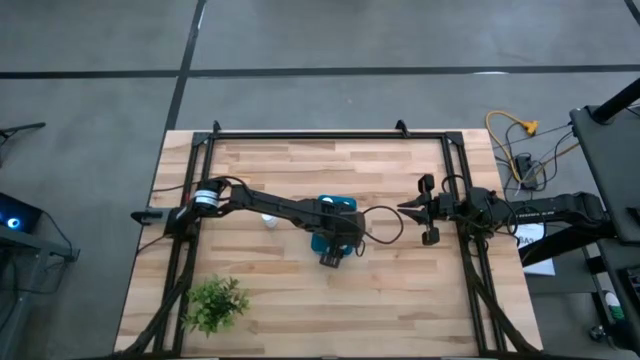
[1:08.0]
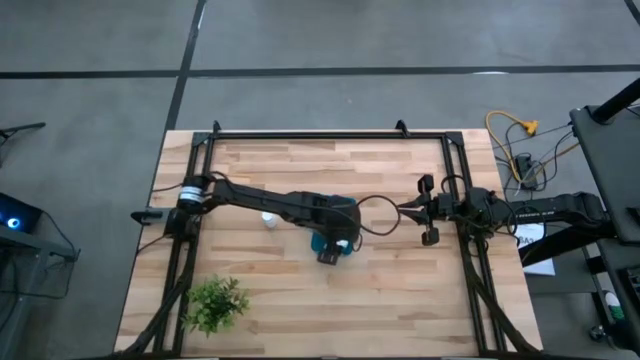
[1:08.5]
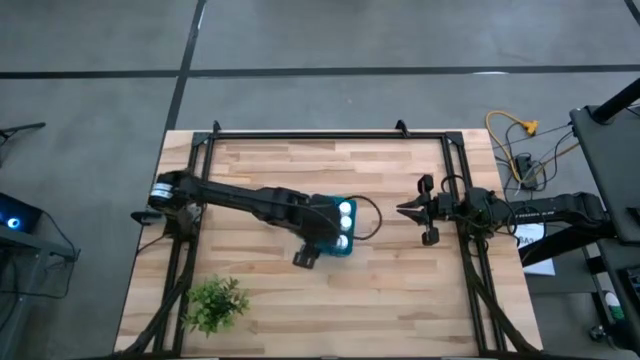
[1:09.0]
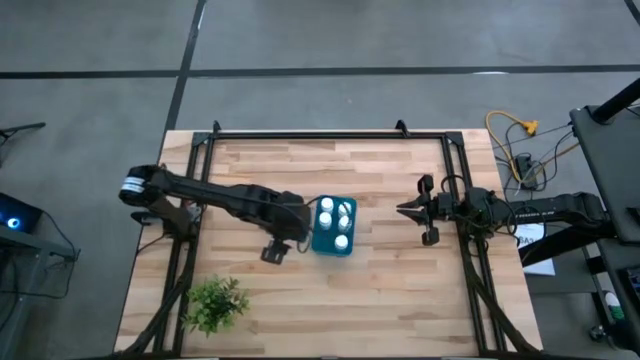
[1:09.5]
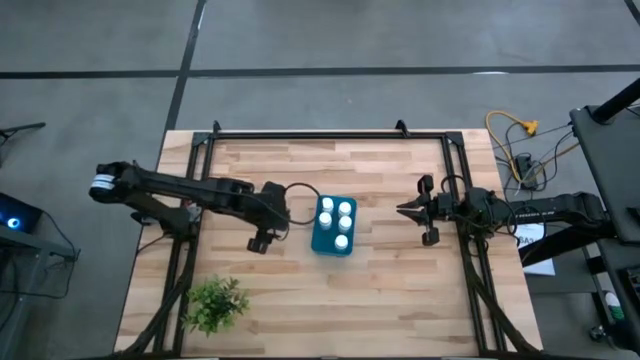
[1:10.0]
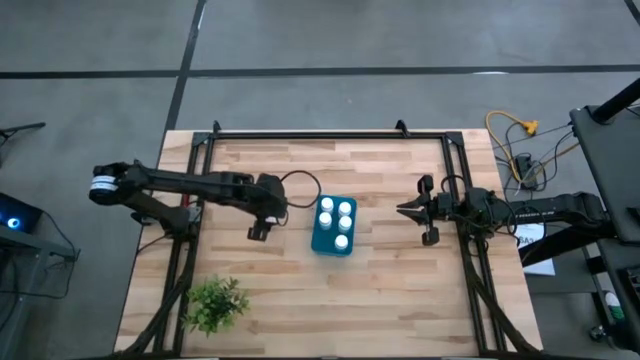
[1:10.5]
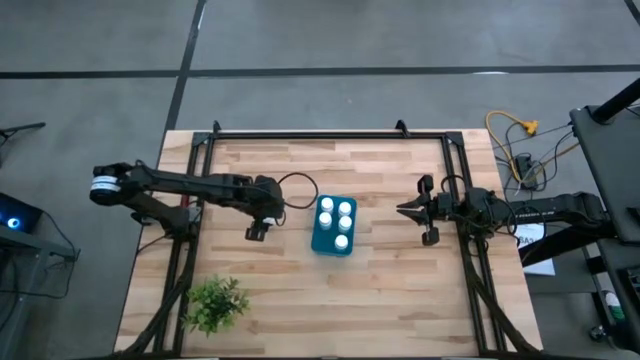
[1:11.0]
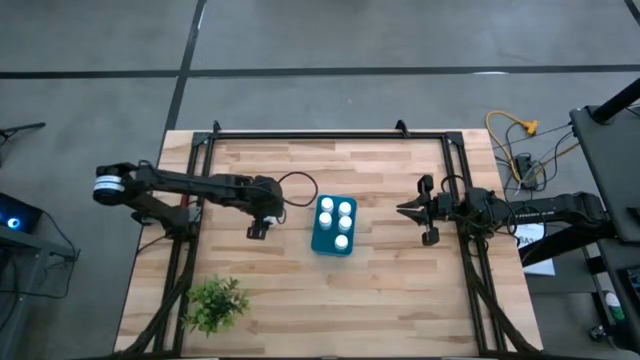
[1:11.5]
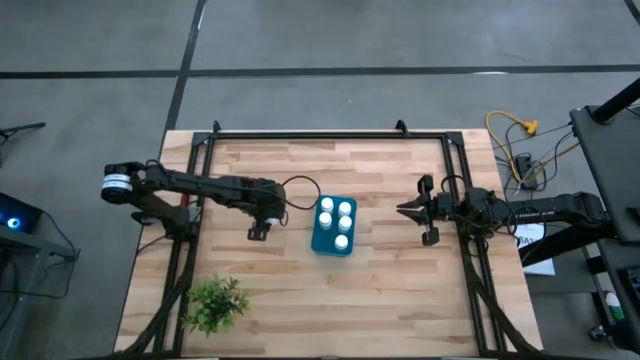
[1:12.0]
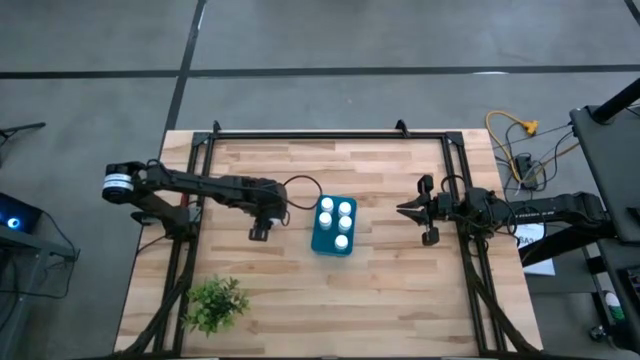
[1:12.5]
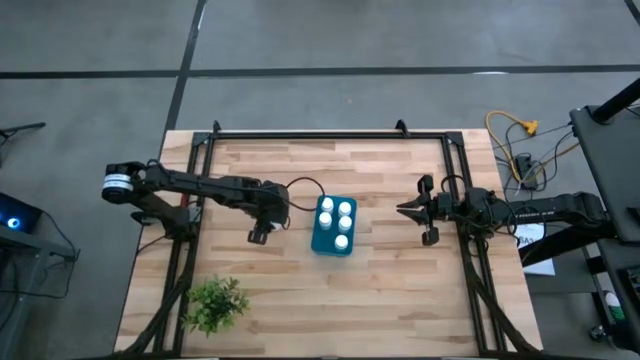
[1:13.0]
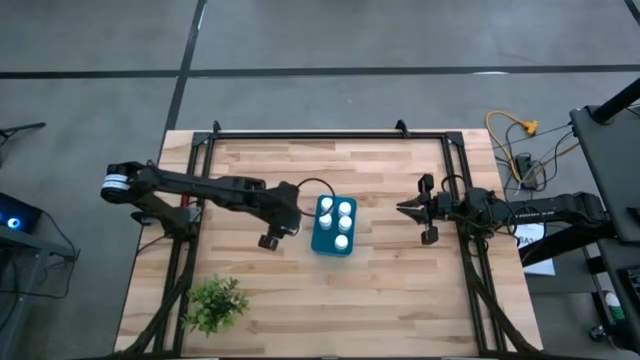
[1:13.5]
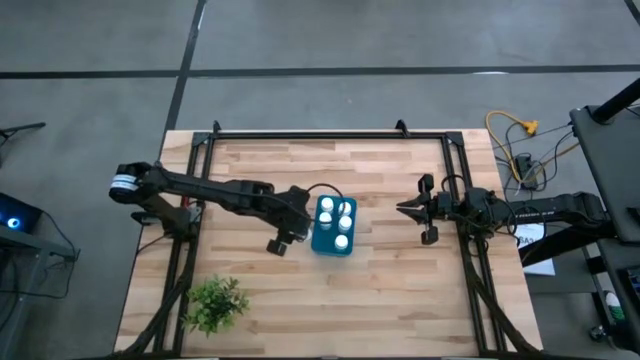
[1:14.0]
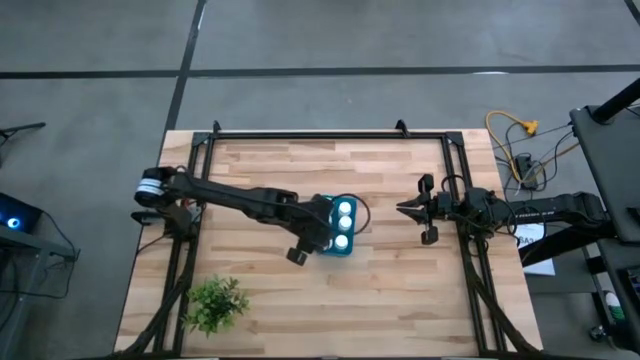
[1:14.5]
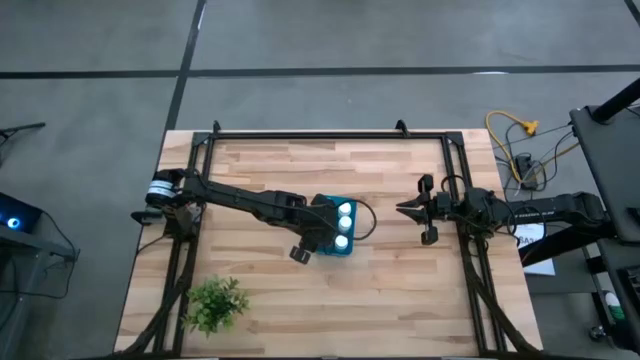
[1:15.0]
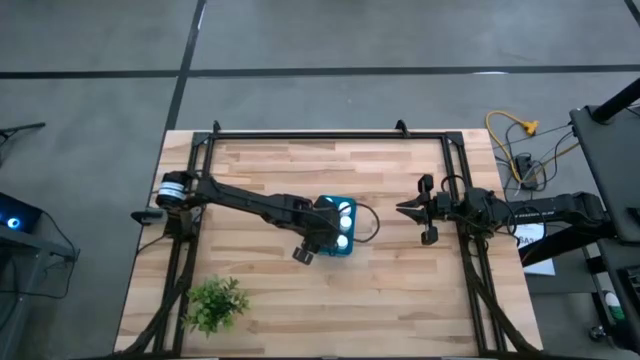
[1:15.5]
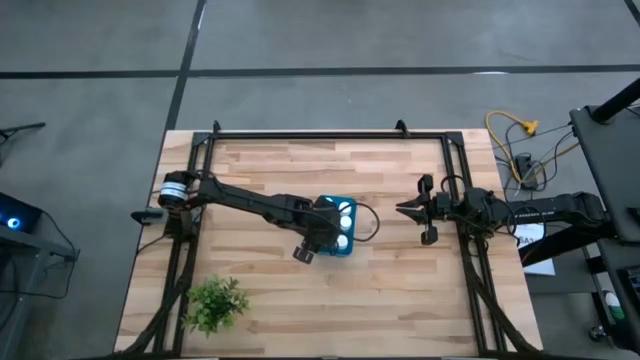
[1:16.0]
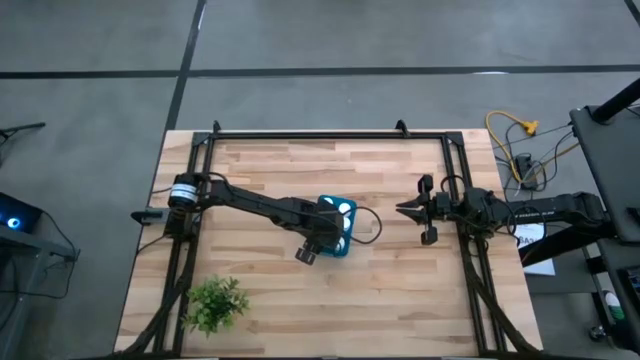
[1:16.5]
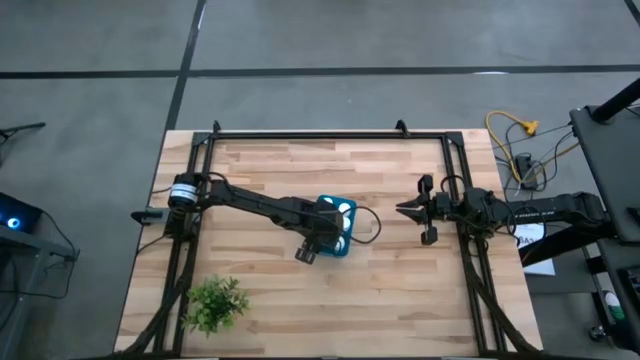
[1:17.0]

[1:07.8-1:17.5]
Task: Pick and place pill bottles into a basket
Put the medicine bottle into the blue bin

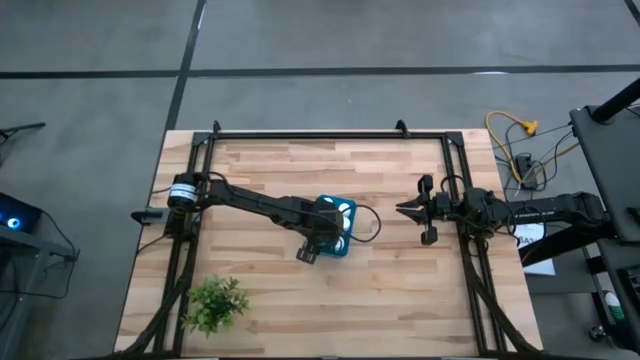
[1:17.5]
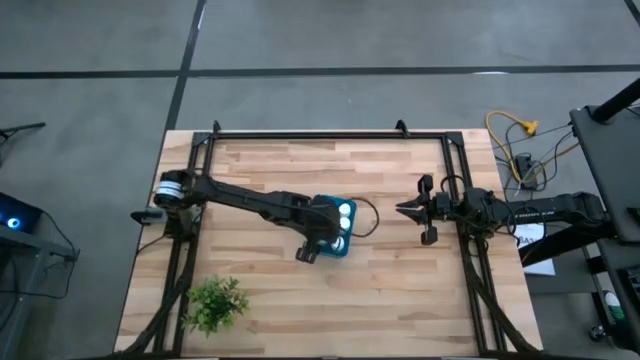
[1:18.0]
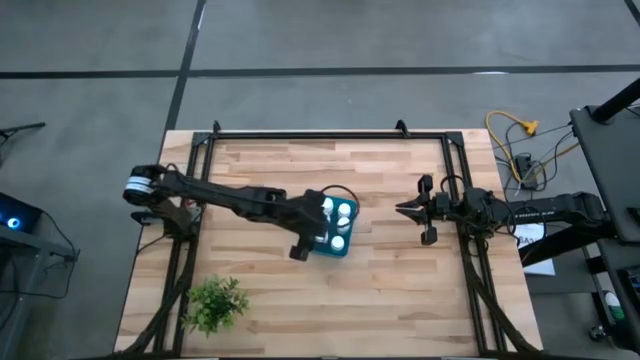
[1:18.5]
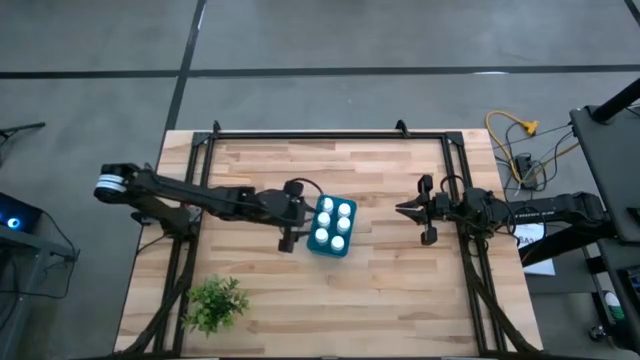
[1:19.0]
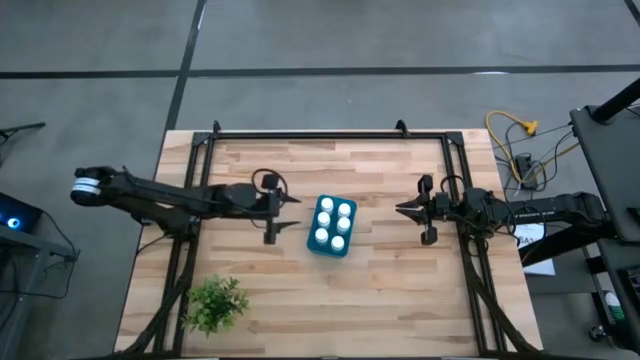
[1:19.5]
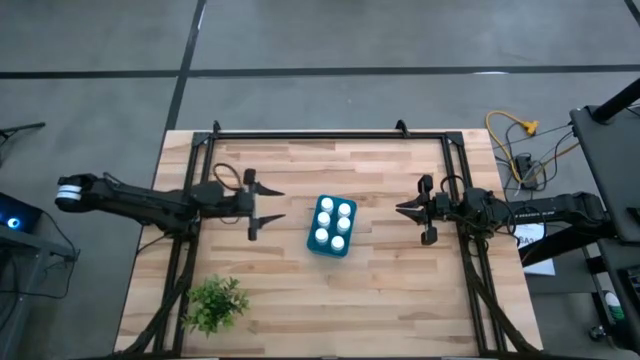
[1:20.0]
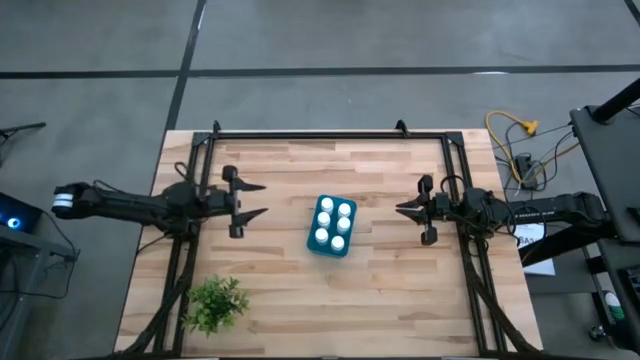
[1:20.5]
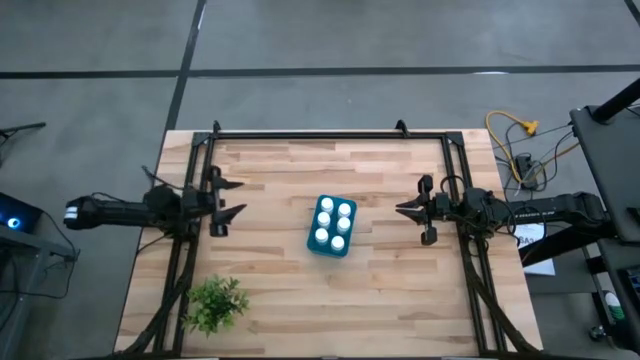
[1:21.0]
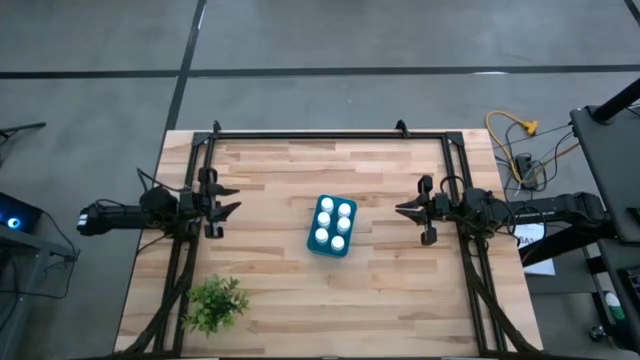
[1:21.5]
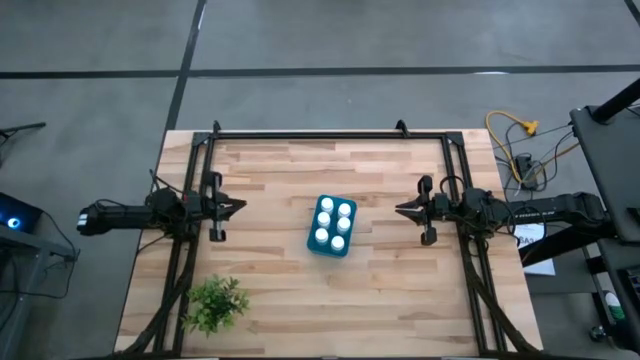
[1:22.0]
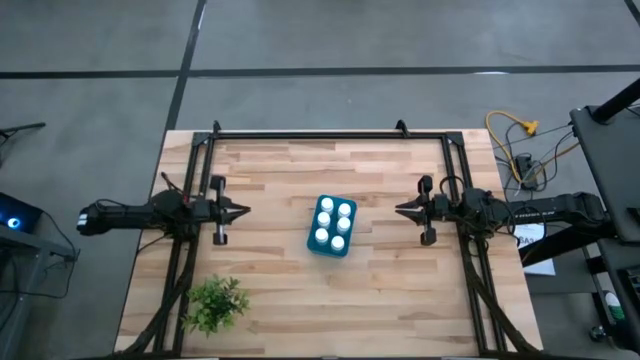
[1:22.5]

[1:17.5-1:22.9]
Return to Home Position

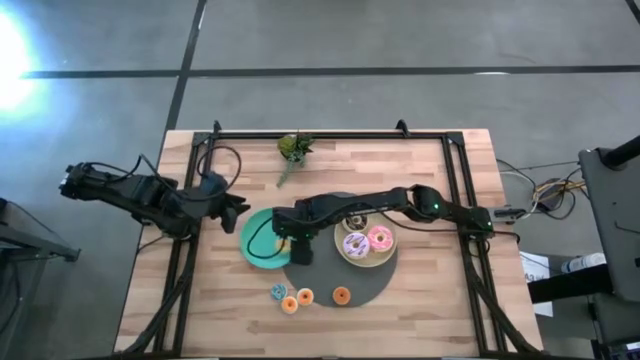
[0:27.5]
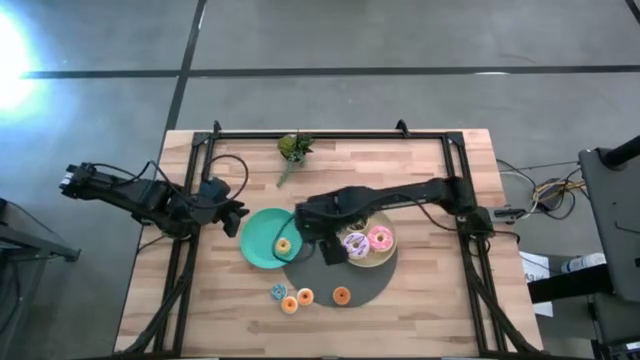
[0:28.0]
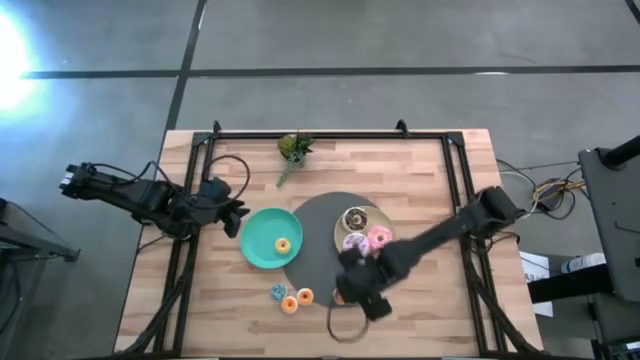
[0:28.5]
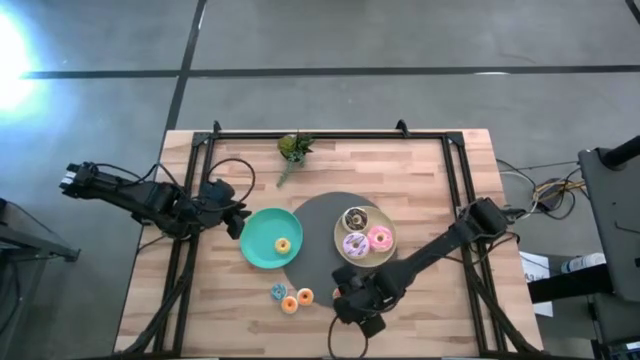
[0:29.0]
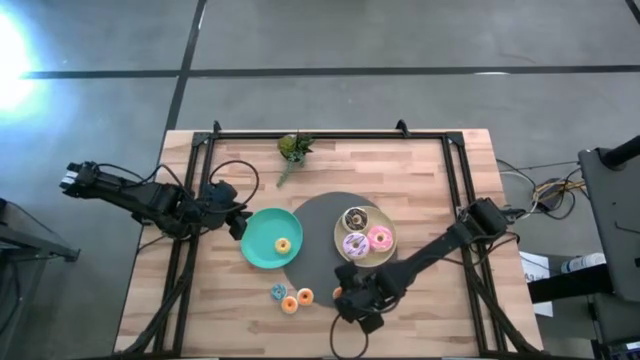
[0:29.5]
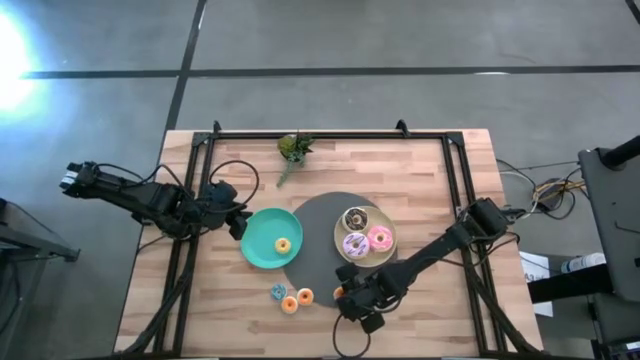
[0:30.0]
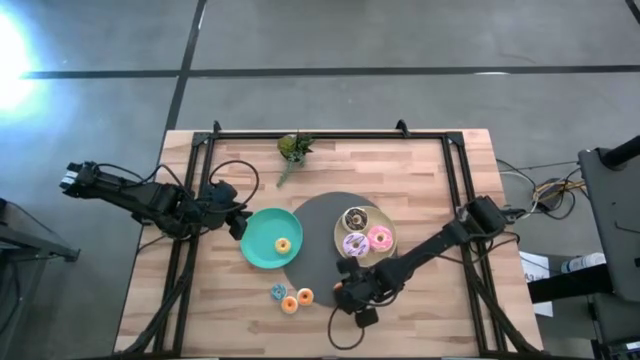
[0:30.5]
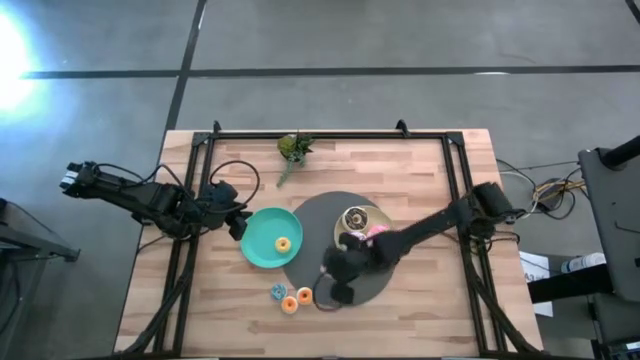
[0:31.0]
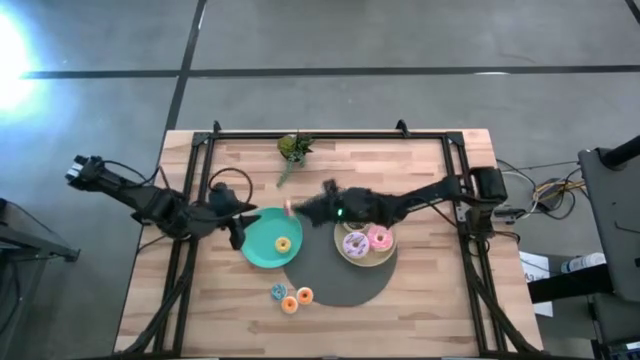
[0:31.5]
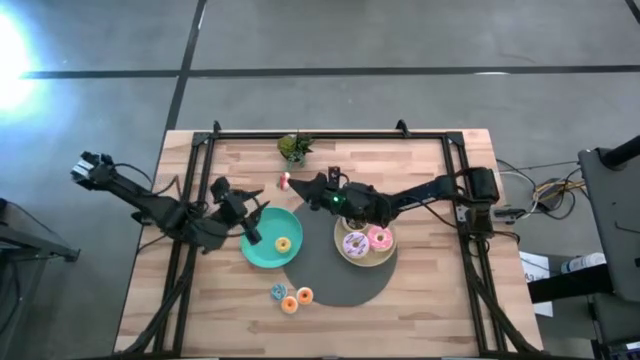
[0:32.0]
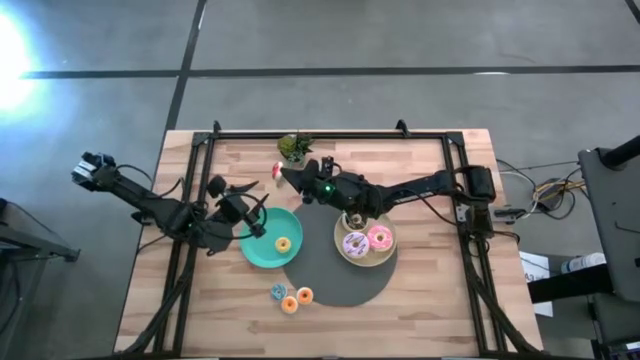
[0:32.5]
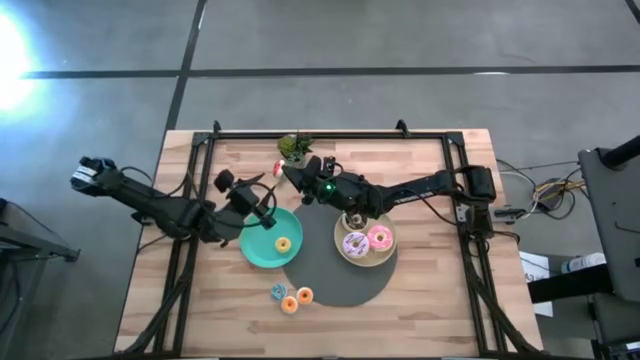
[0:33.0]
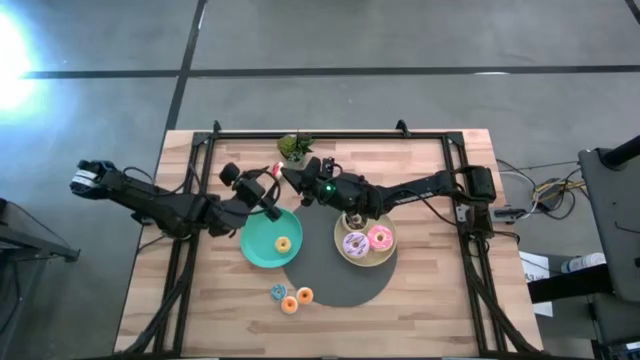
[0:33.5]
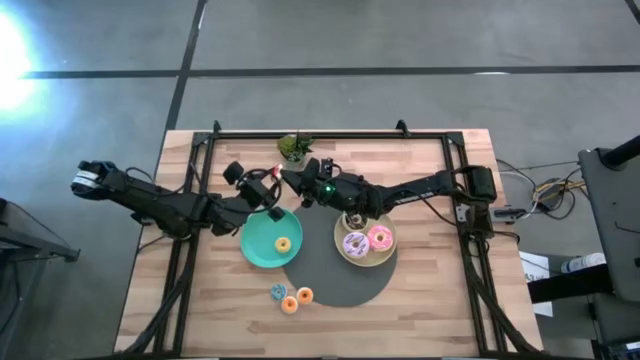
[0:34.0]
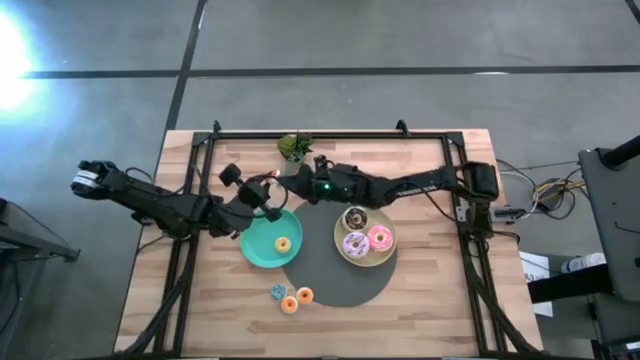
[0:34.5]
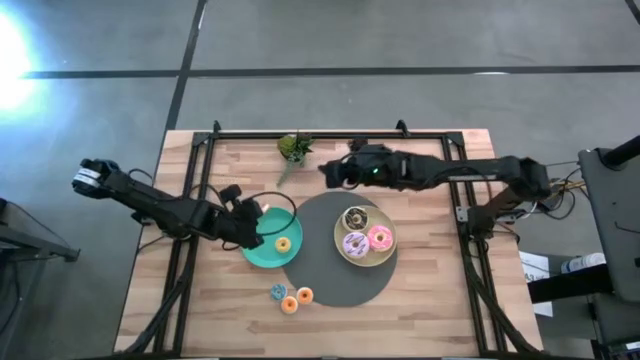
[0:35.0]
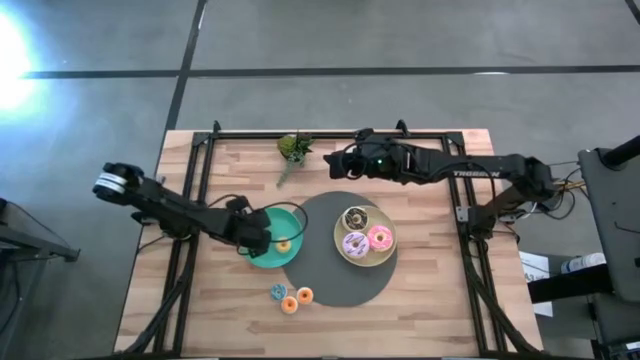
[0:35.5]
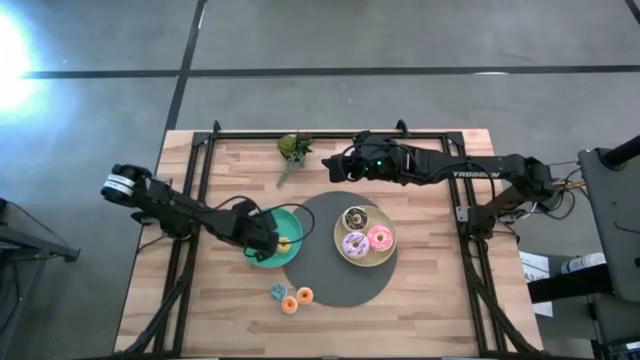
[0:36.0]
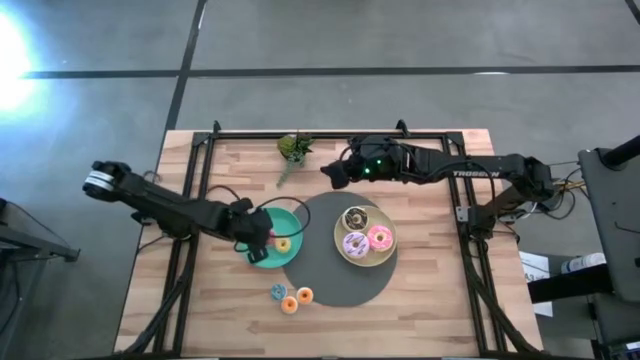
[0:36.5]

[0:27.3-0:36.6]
Task: Pick & Place donuts
Put the orange doughnut on the green plate
